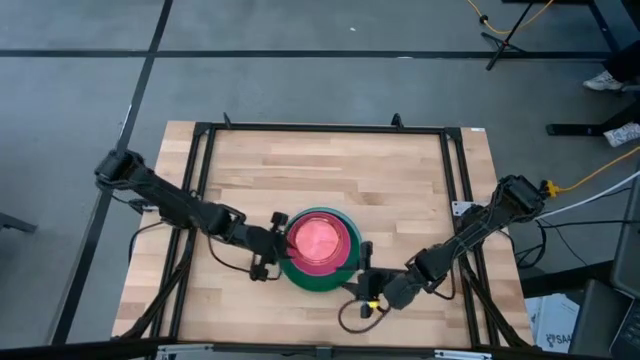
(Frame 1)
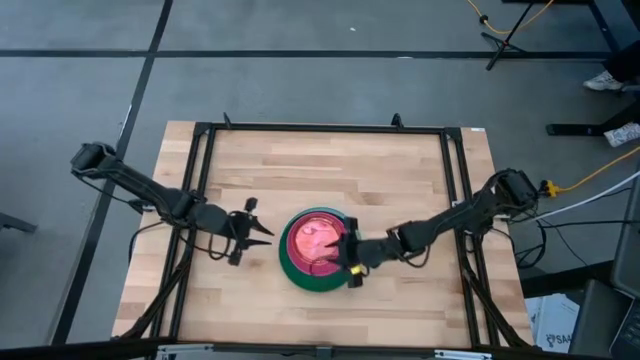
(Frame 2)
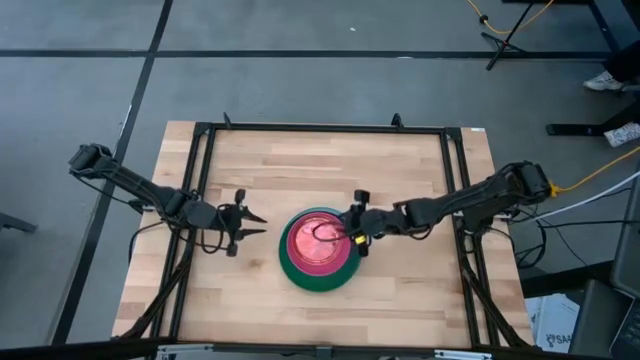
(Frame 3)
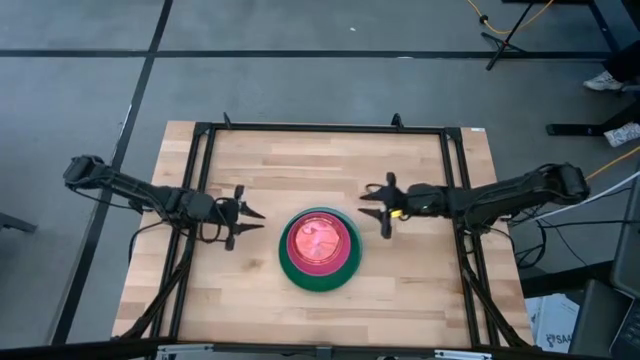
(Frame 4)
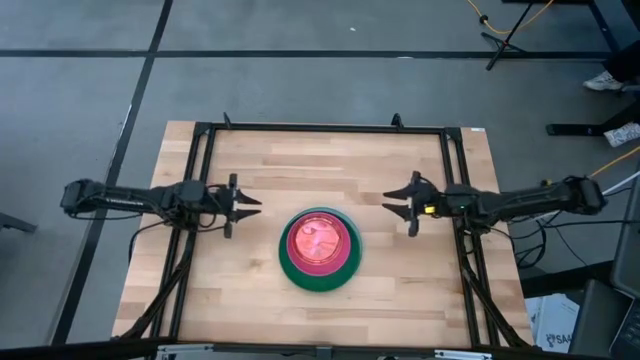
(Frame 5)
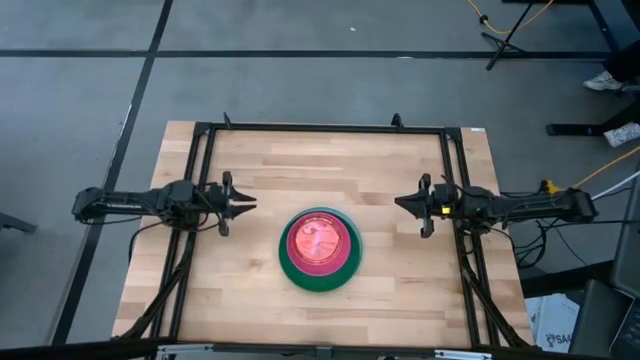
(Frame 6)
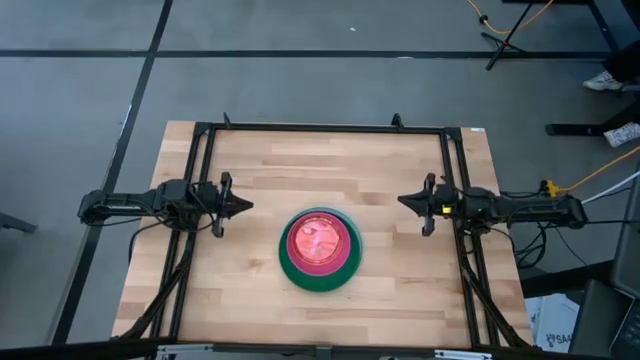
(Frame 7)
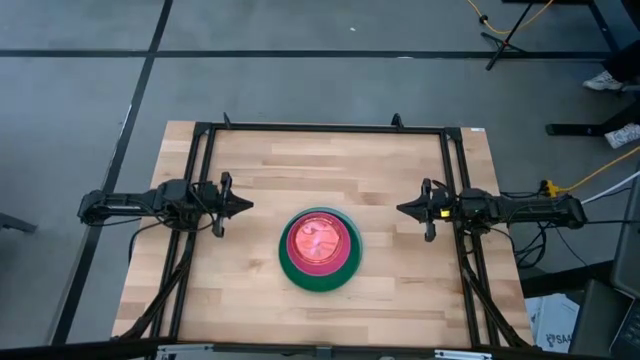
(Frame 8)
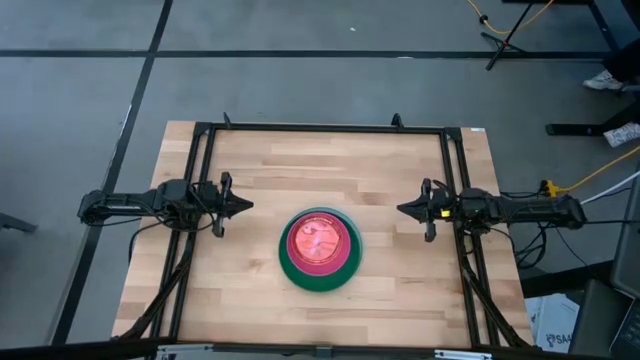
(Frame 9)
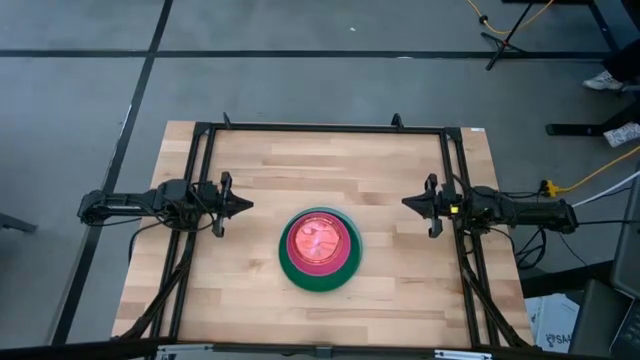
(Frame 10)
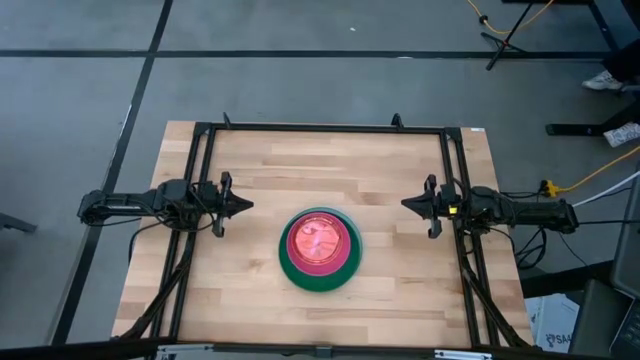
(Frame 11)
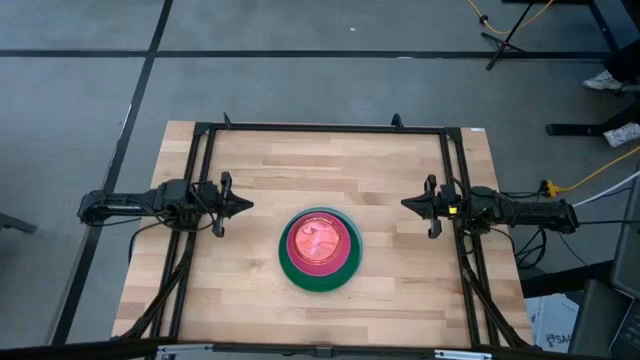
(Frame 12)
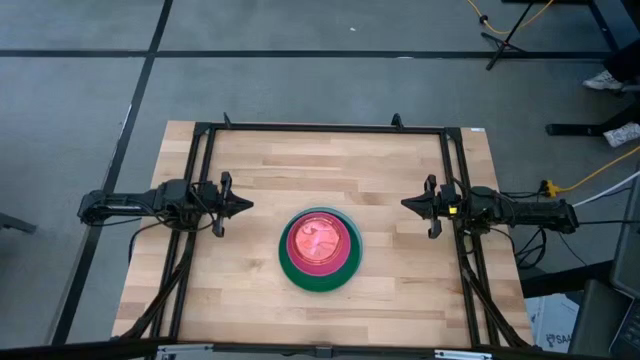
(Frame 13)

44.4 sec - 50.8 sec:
Task: Stack plastic plates
Return to Home Position

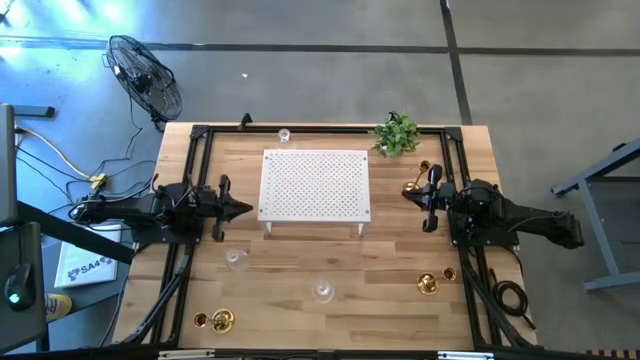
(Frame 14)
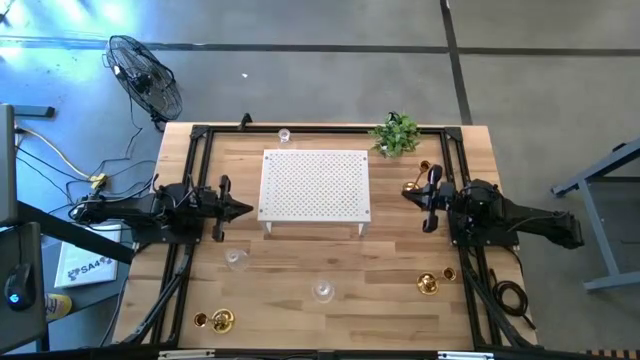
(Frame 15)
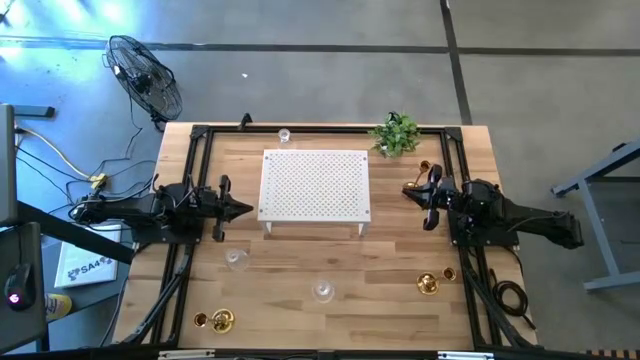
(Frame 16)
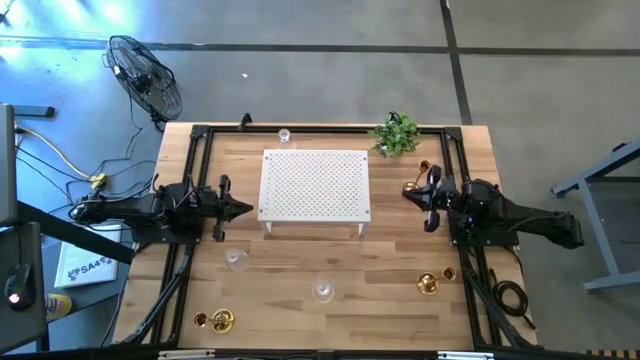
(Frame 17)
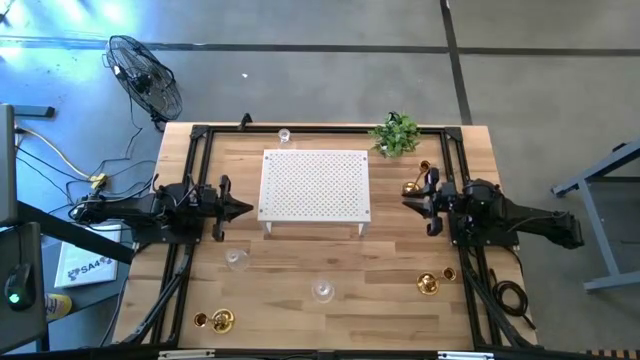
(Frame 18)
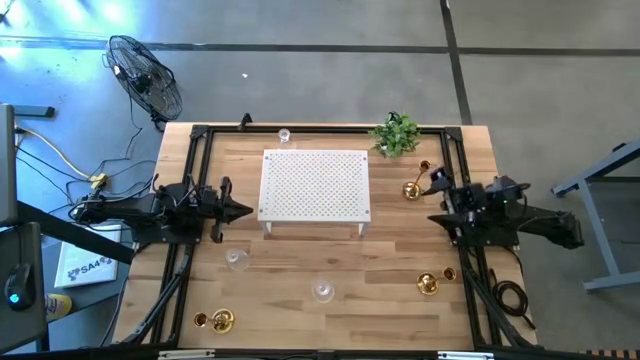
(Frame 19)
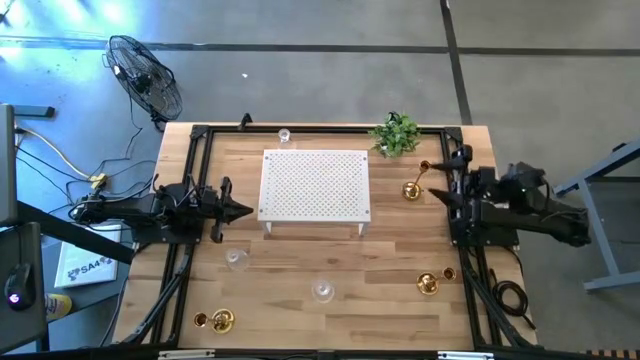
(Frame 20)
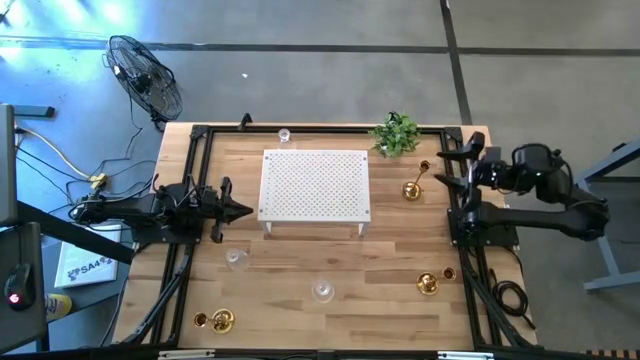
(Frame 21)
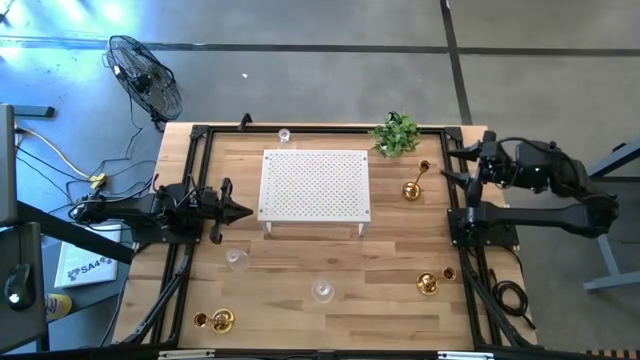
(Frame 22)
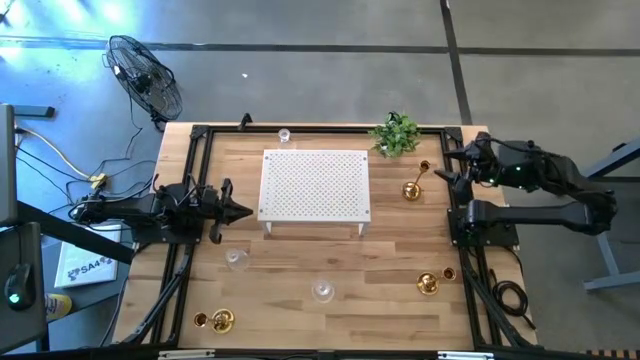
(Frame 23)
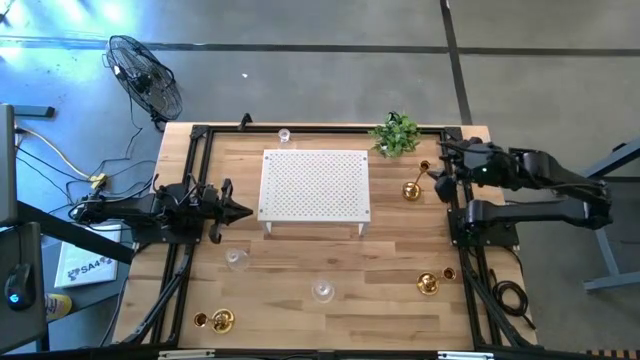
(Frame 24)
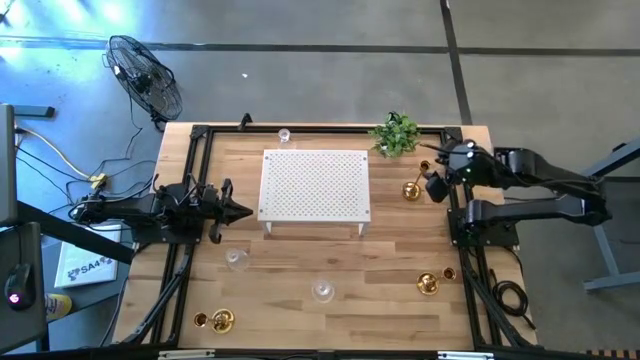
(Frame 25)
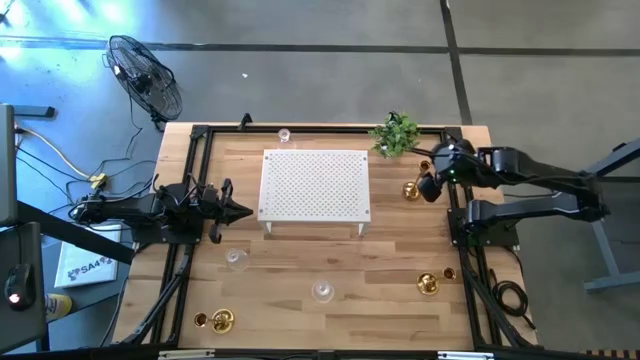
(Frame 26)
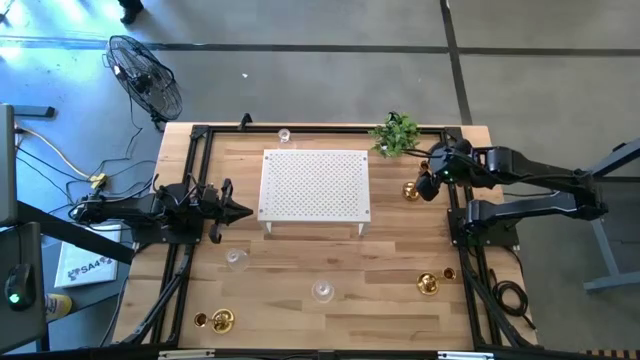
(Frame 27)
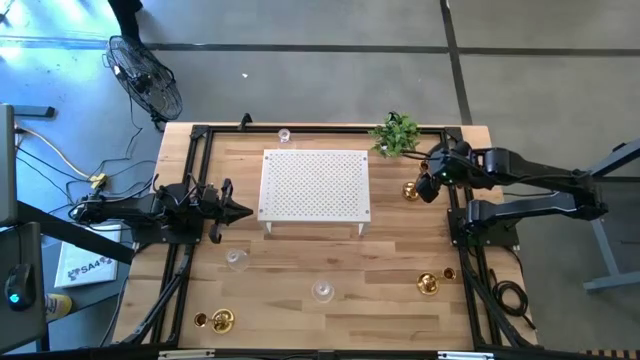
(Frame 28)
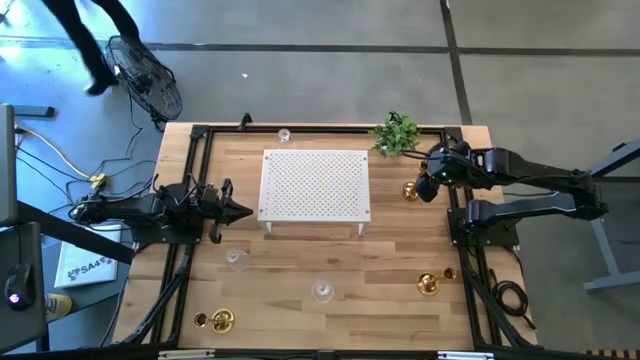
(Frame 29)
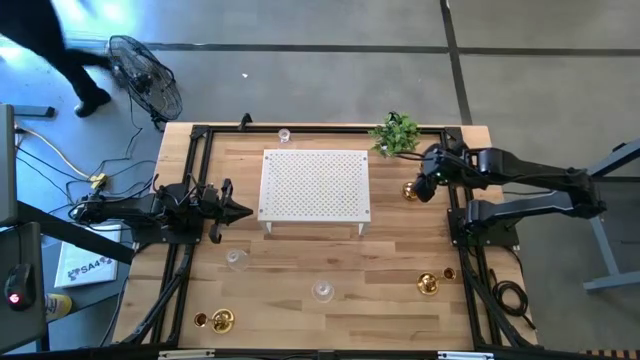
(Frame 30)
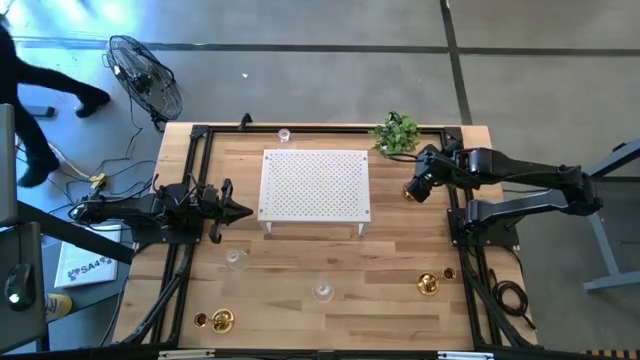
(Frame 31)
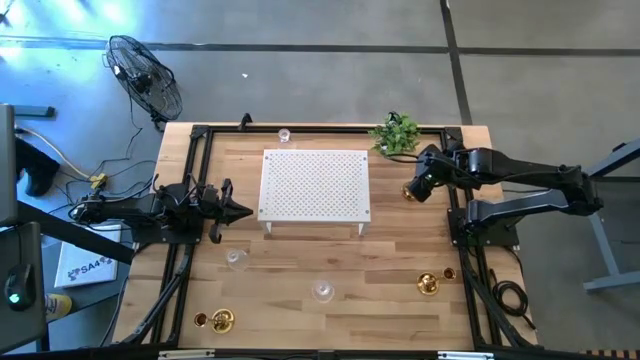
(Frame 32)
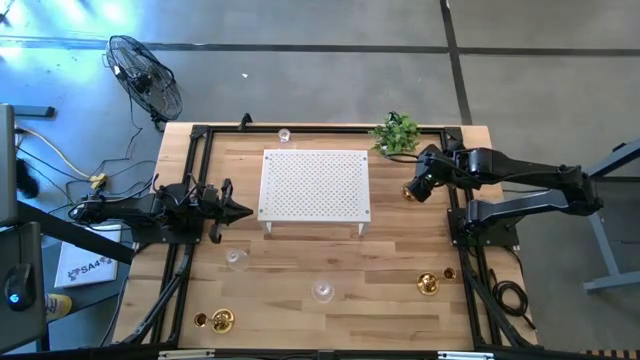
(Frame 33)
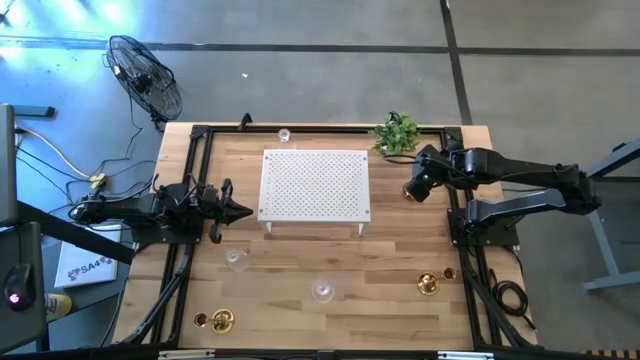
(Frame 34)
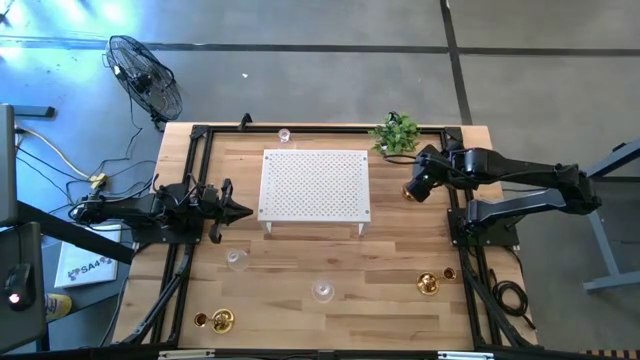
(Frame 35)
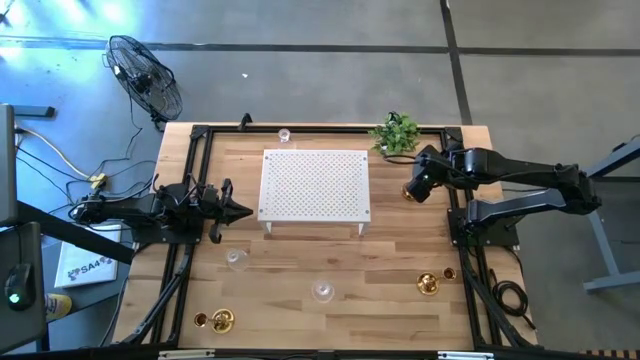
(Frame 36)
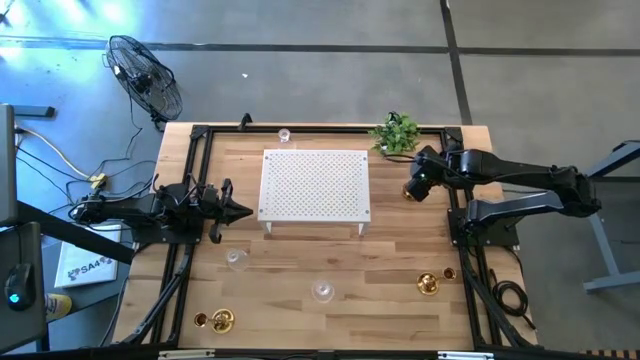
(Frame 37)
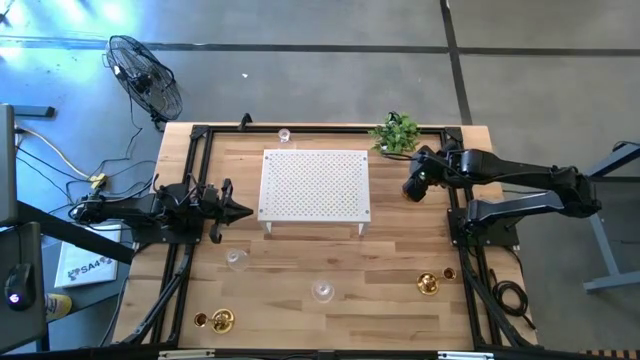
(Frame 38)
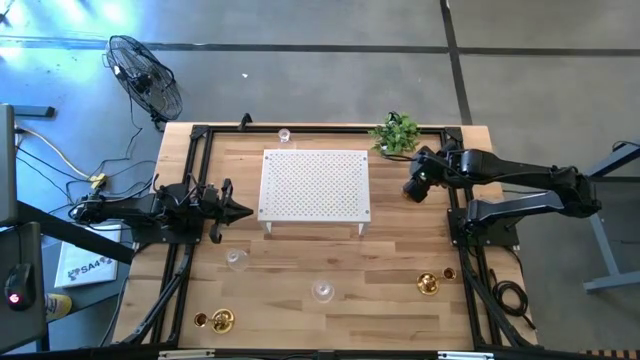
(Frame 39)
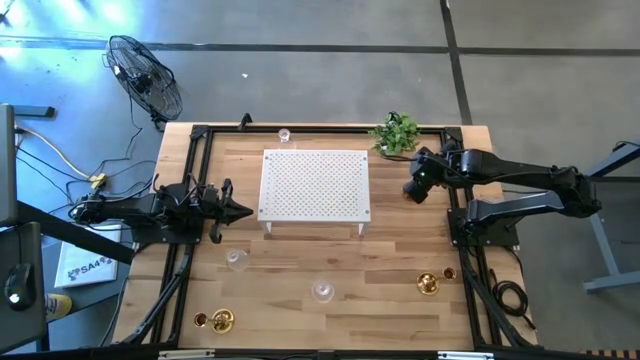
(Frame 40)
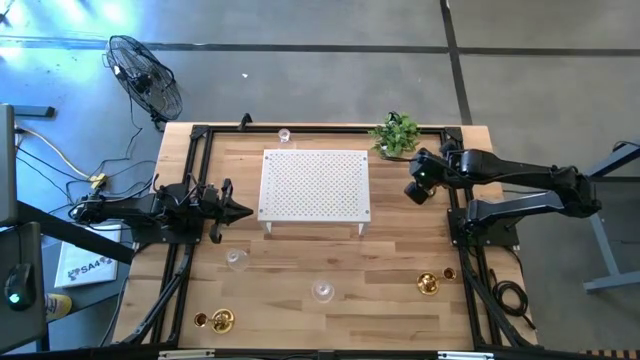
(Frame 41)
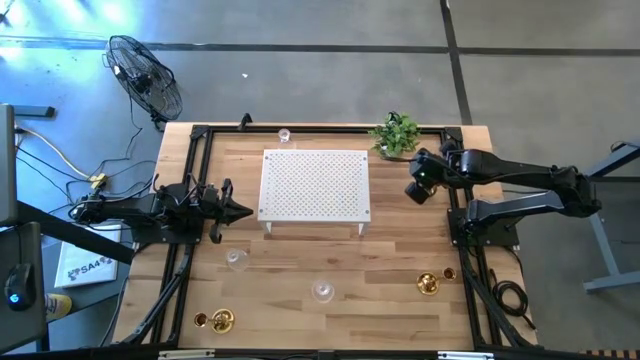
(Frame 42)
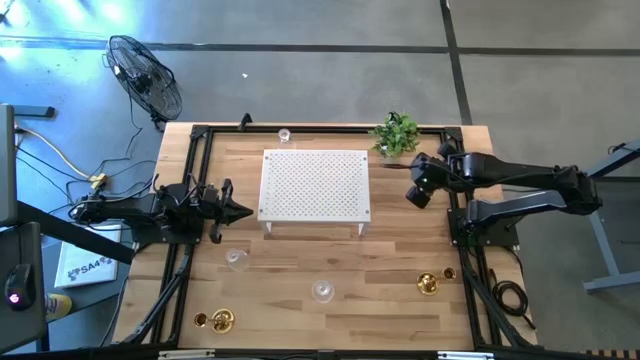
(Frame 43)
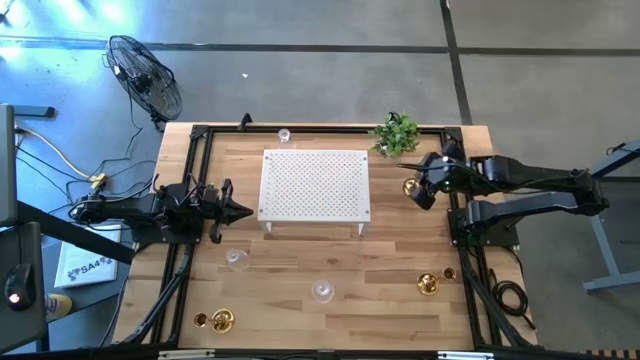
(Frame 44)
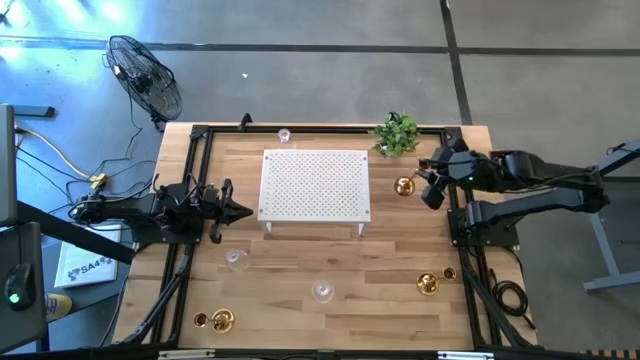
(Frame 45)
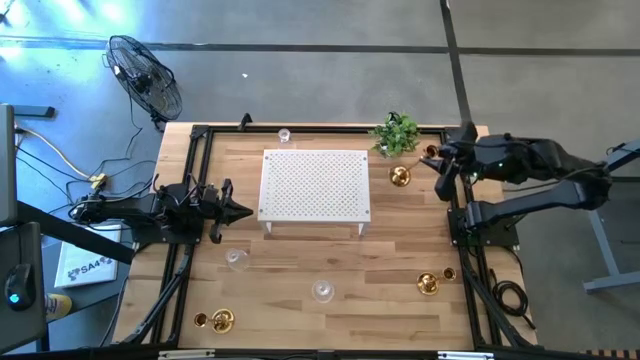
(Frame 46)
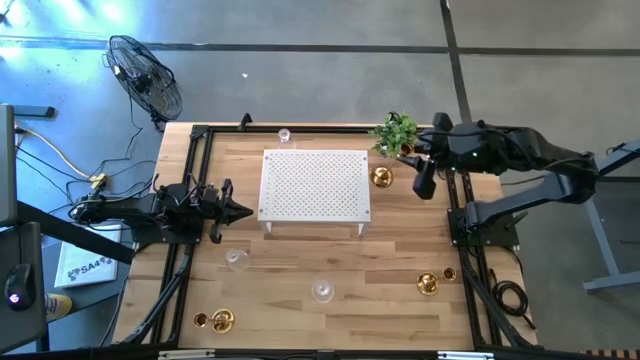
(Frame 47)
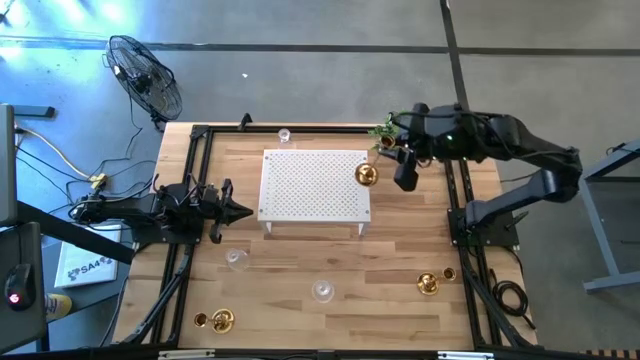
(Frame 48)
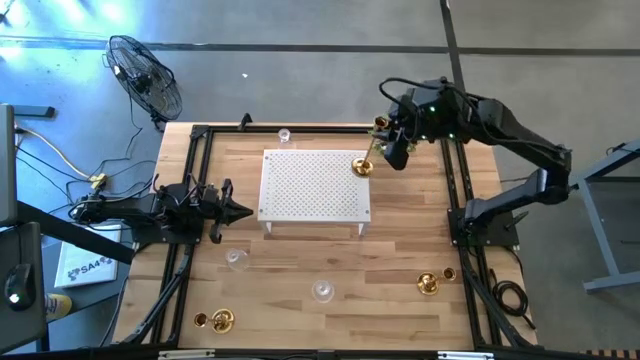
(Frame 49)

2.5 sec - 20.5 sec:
Task: Pick & Place candle stick holders
Put the top right gold candle holder on the shelf
